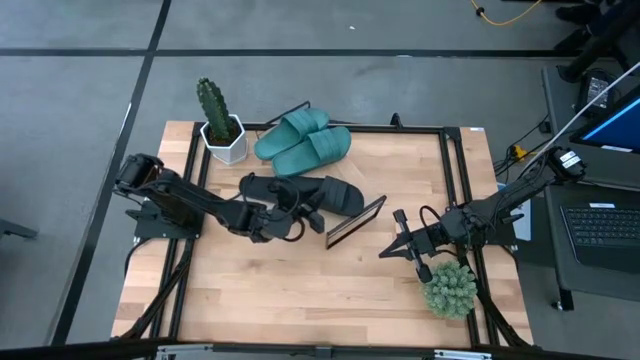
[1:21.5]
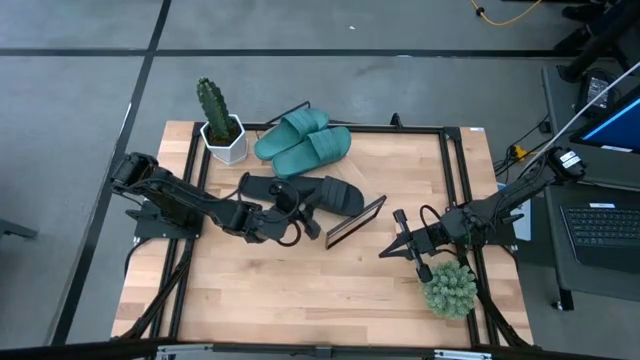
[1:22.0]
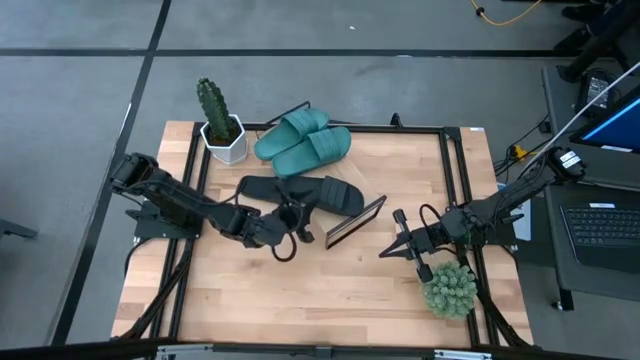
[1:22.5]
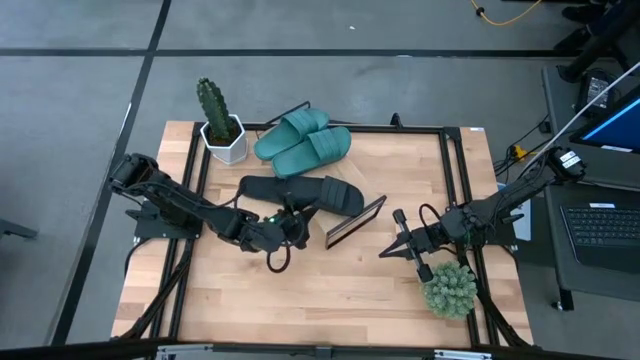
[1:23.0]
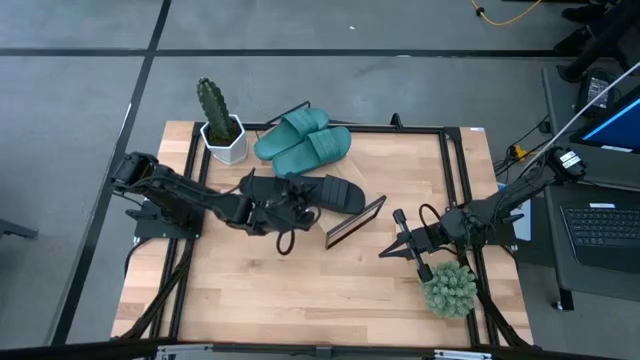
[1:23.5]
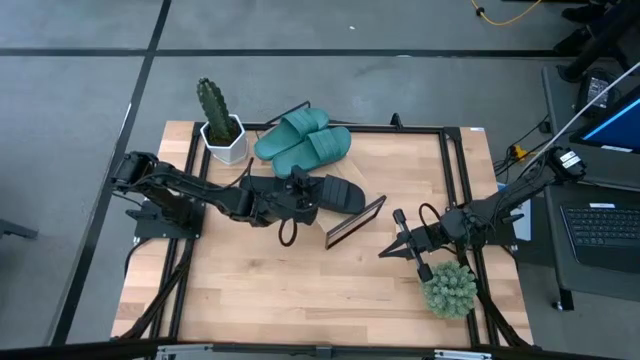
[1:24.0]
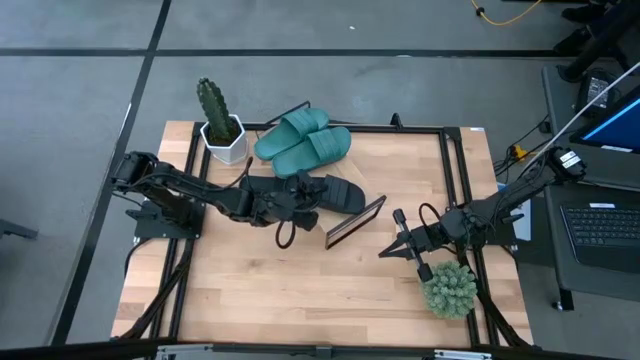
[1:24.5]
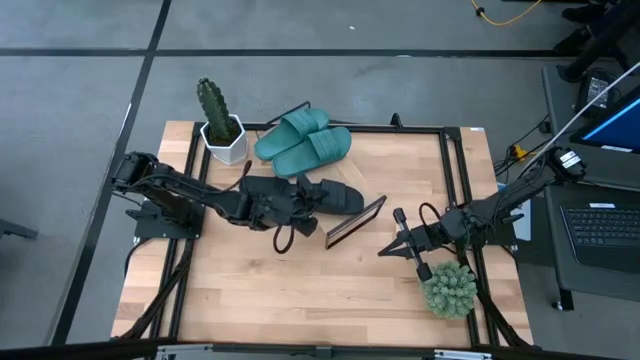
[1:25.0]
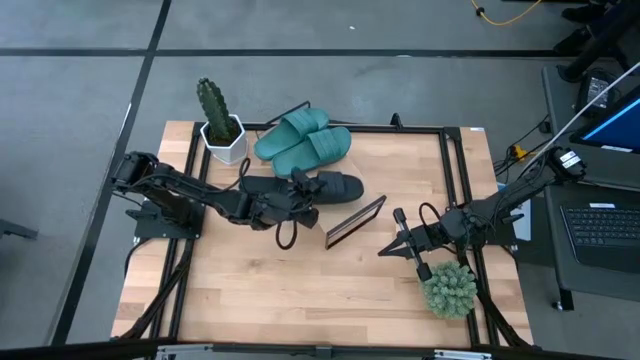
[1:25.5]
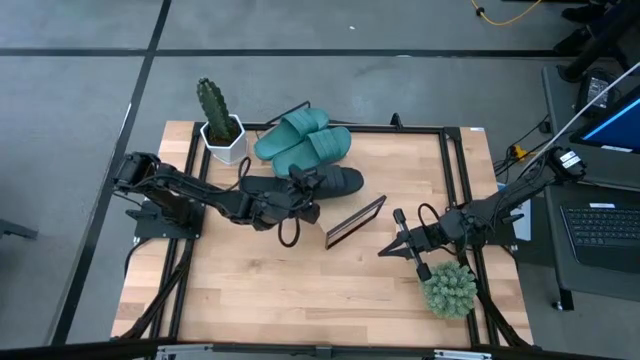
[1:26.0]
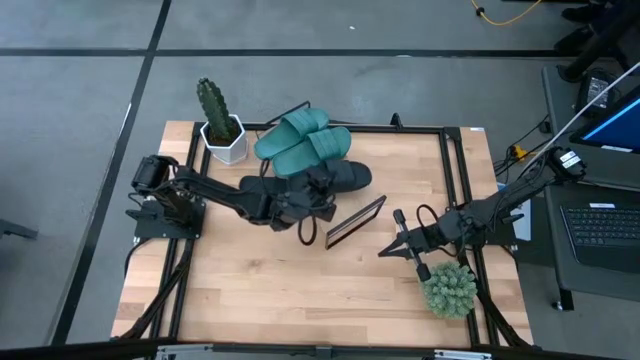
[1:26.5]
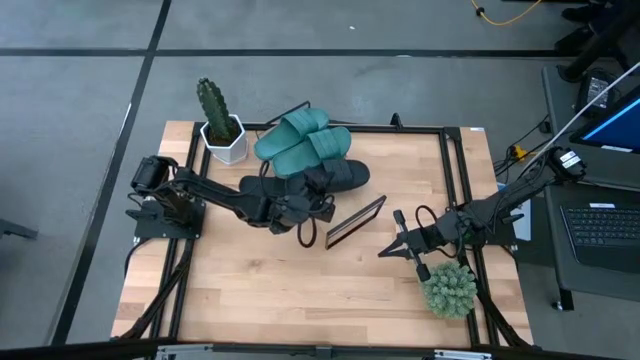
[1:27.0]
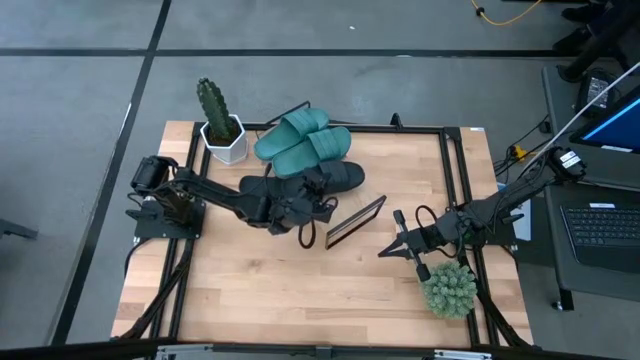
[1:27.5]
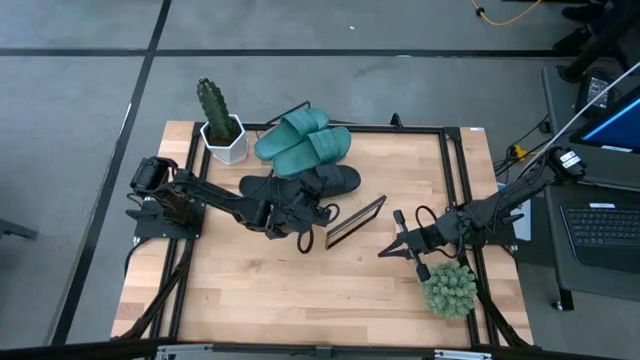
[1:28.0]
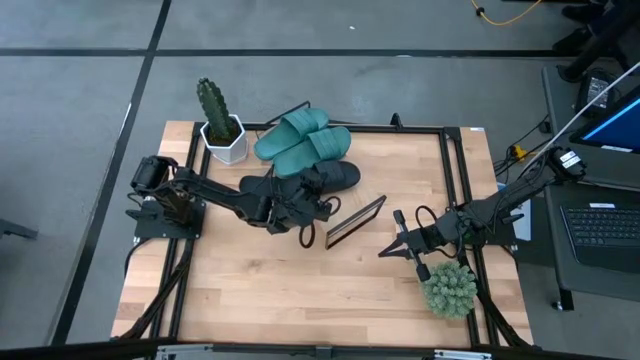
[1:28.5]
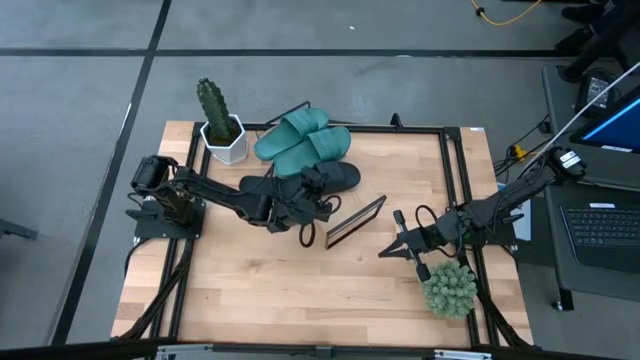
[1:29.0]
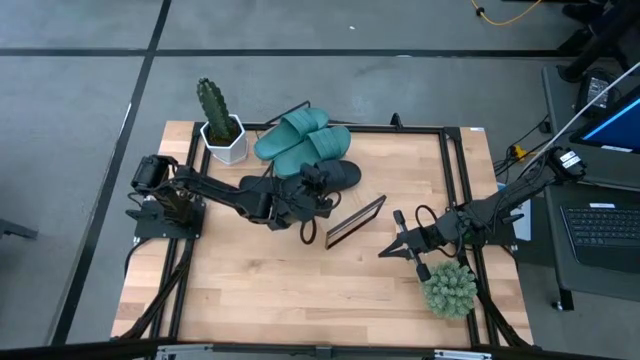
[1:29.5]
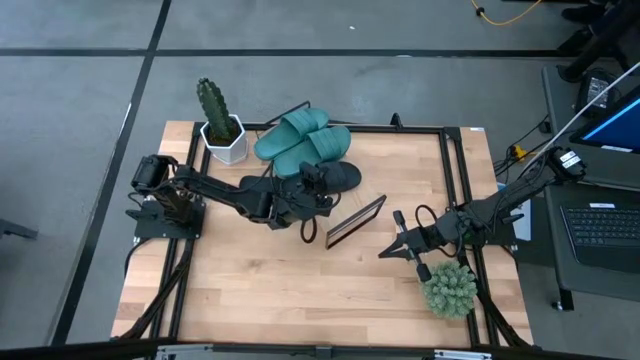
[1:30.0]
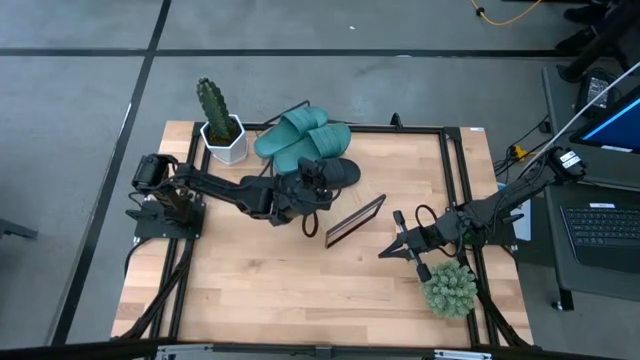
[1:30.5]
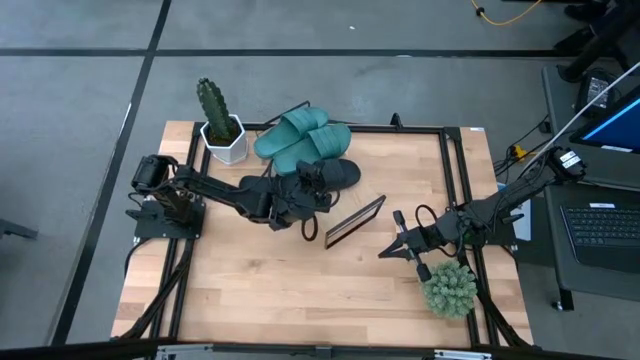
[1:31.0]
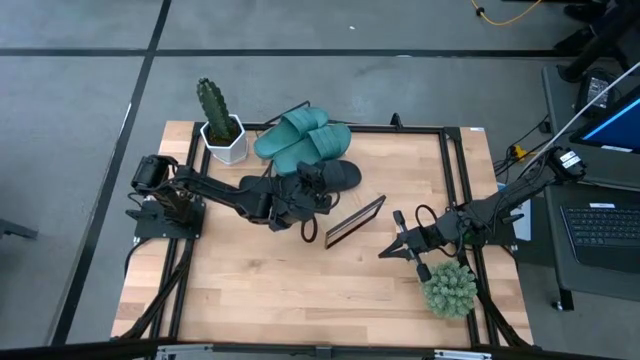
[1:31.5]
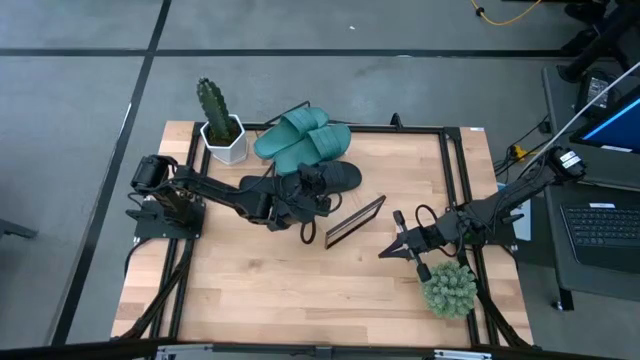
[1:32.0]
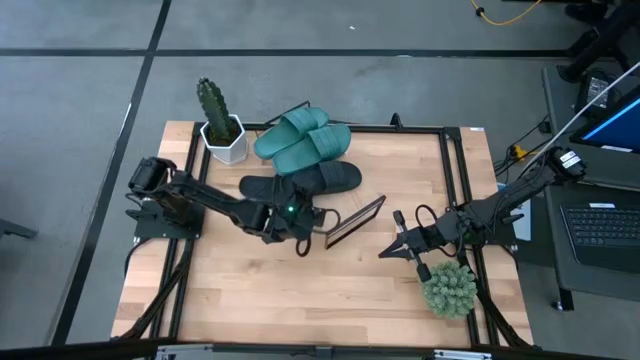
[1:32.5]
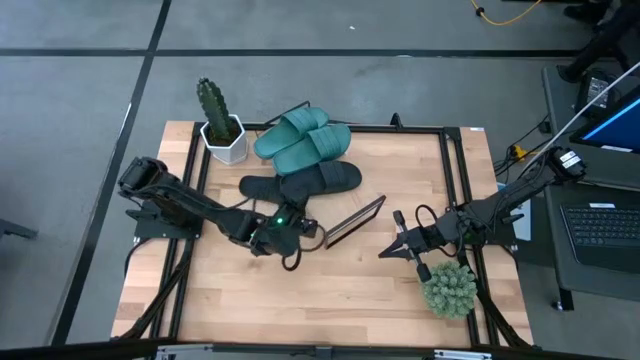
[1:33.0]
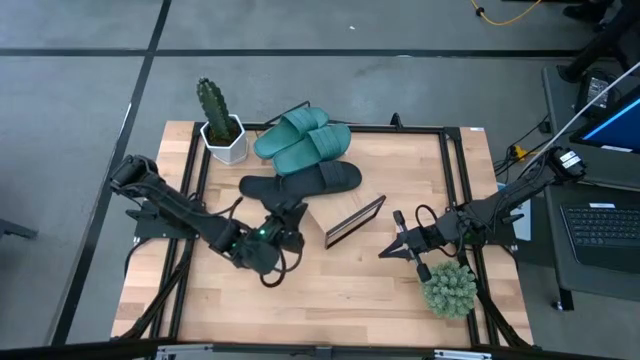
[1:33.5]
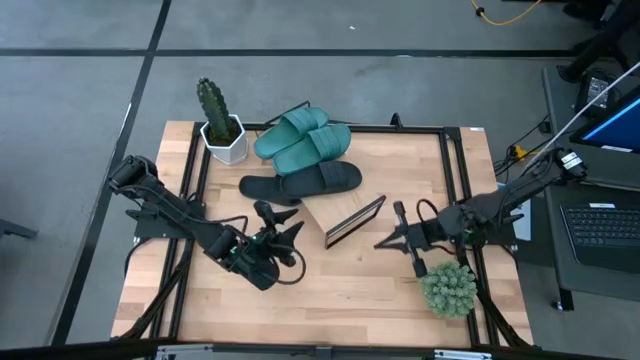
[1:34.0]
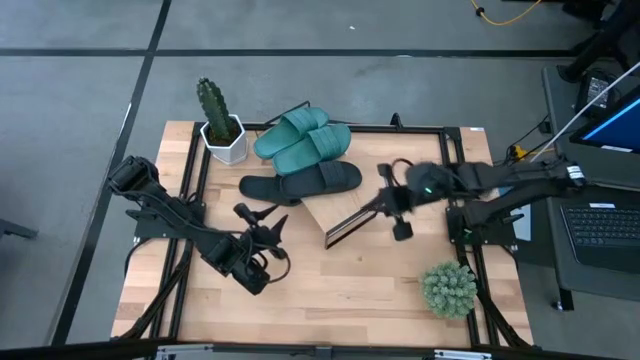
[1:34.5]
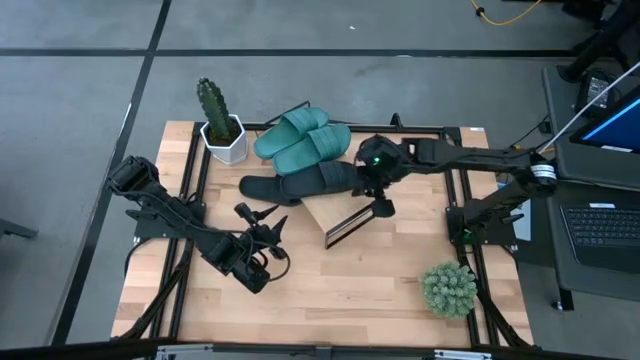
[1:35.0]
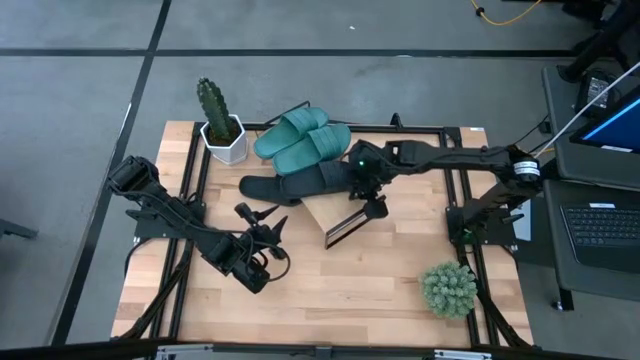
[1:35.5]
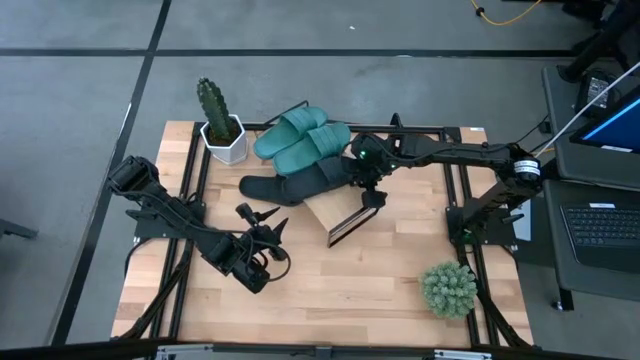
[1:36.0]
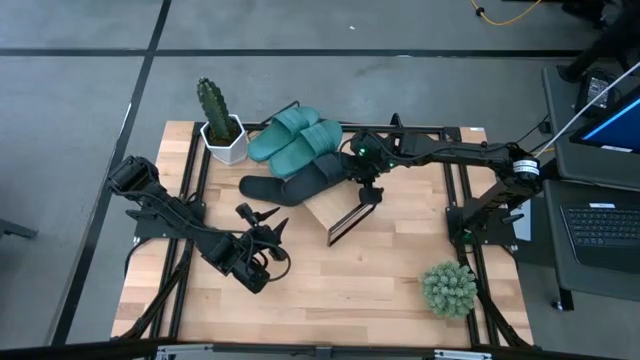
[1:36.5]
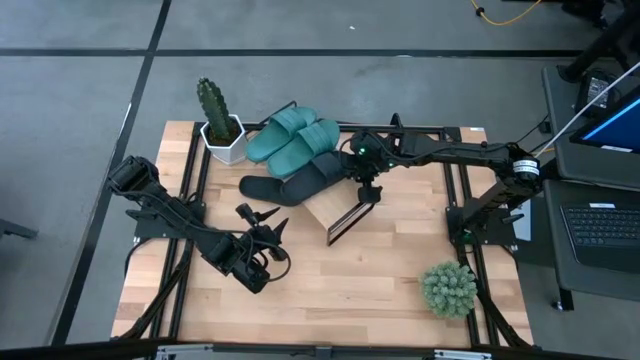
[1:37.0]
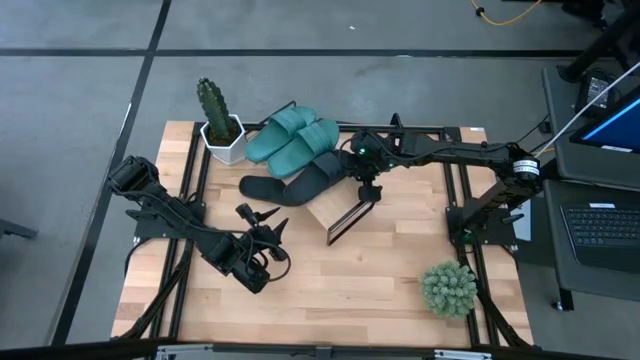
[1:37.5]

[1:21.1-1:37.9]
Task: Pick and place slides into the shelf
Put the bottom black slipper onto the shelf

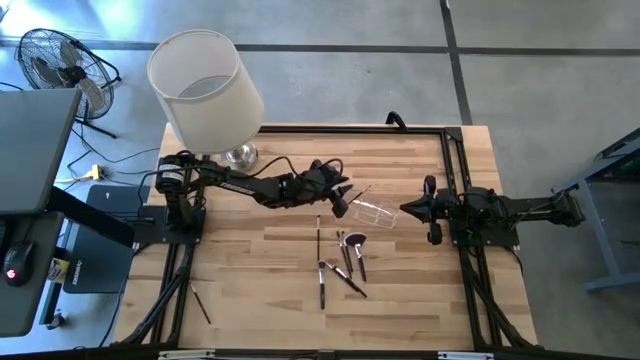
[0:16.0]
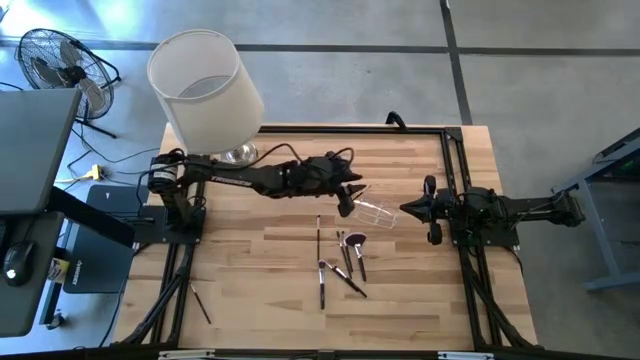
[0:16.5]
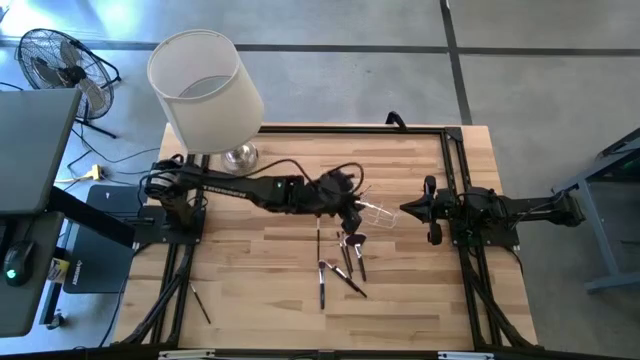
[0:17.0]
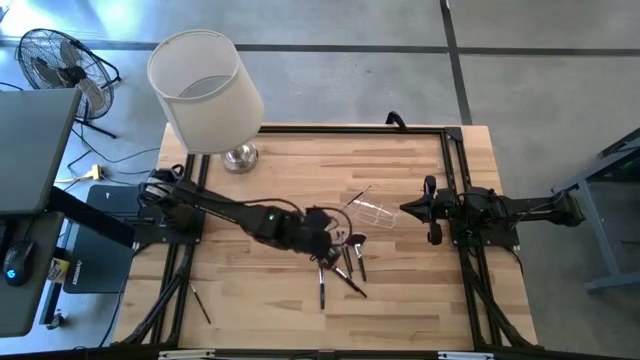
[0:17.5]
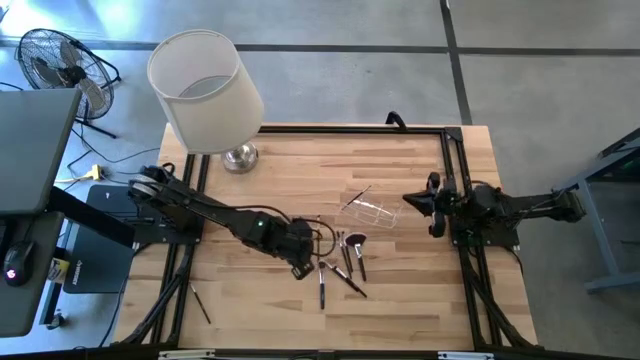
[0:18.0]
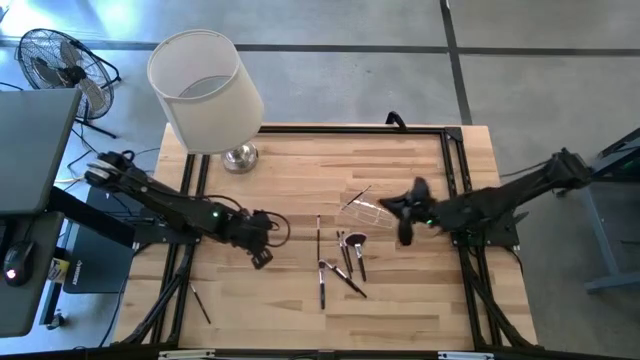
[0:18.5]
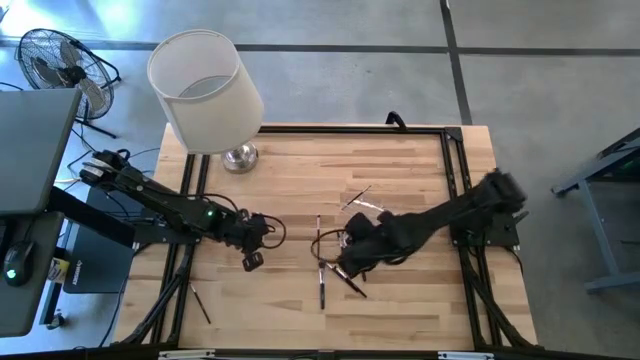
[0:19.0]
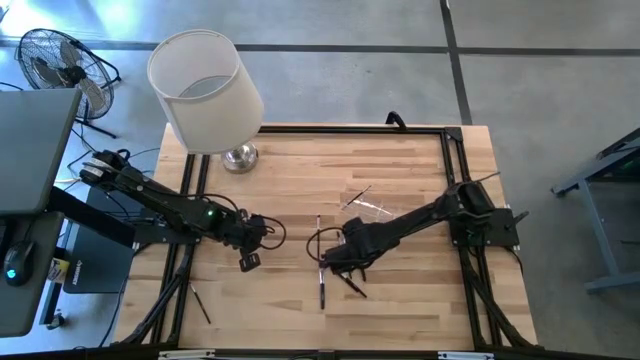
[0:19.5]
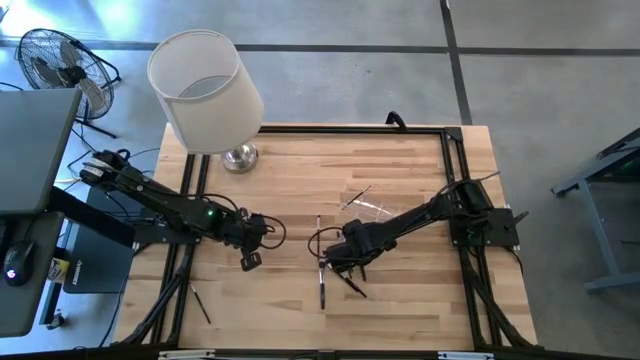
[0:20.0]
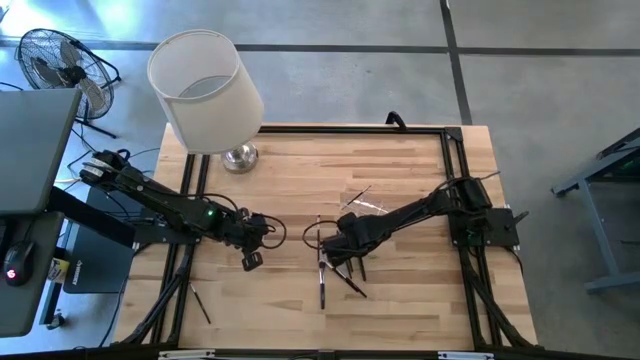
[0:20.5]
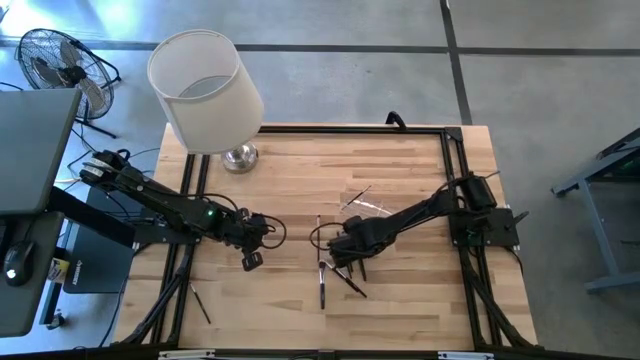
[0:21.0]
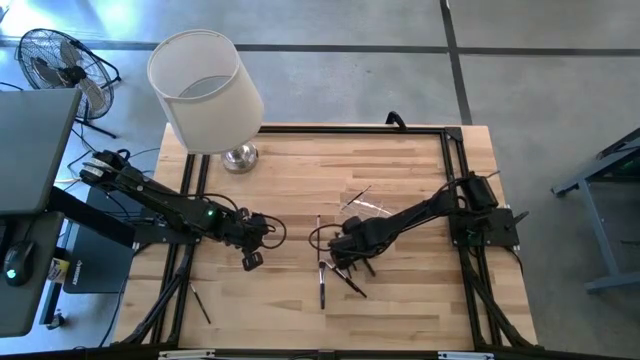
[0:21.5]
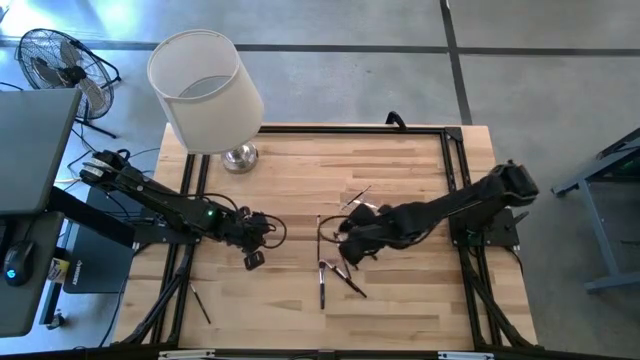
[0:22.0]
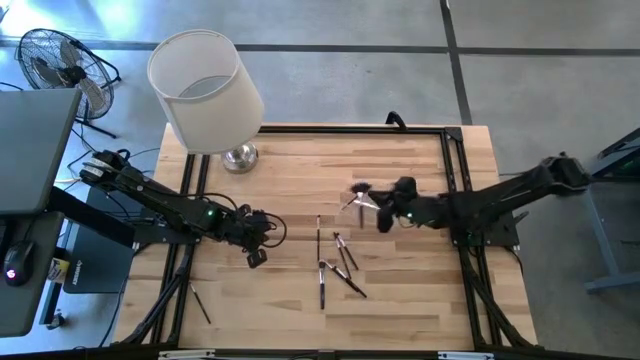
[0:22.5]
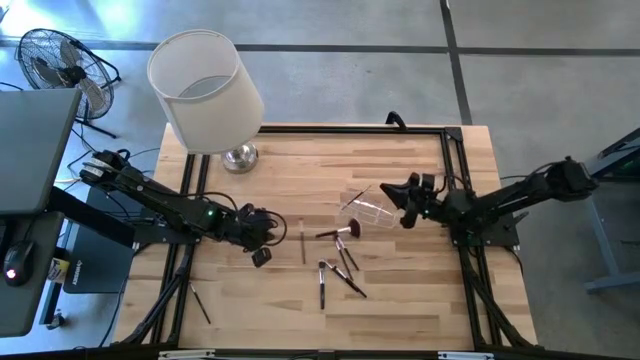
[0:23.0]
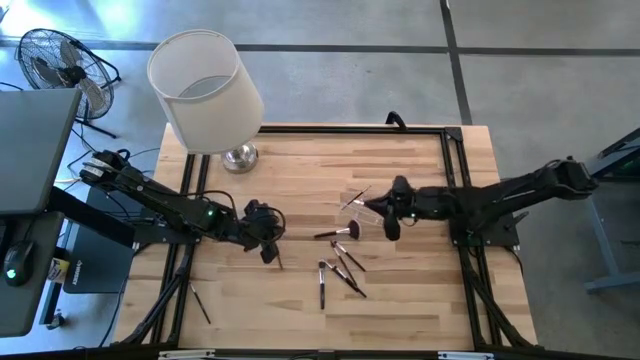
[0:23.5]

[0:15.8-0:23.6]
Task: Put items in baskets/containers
Put the black highlighter brush into the transparent organizer
